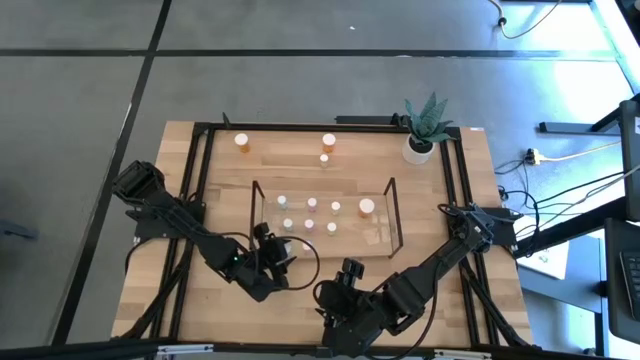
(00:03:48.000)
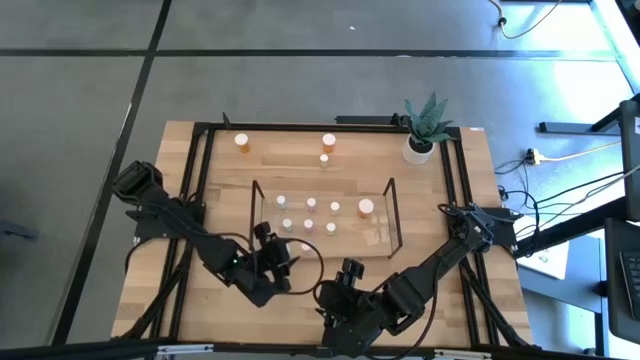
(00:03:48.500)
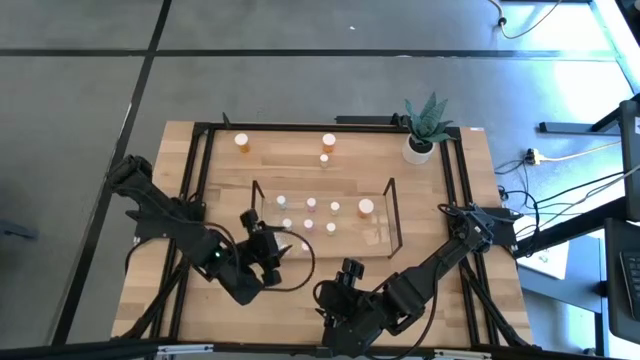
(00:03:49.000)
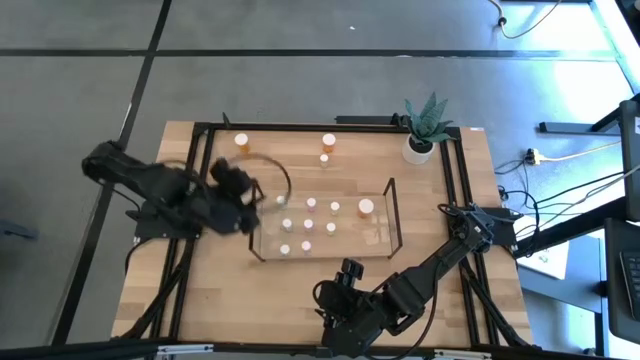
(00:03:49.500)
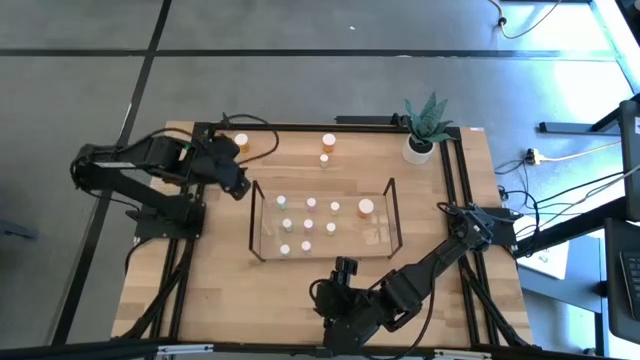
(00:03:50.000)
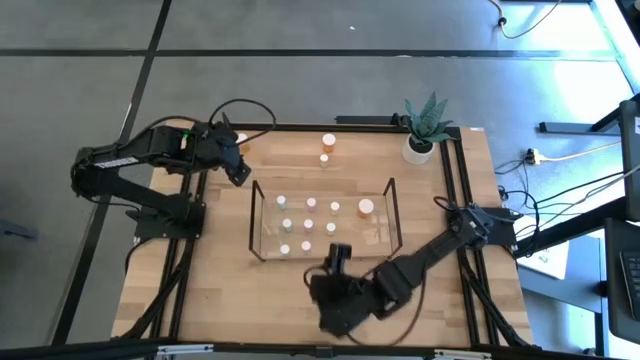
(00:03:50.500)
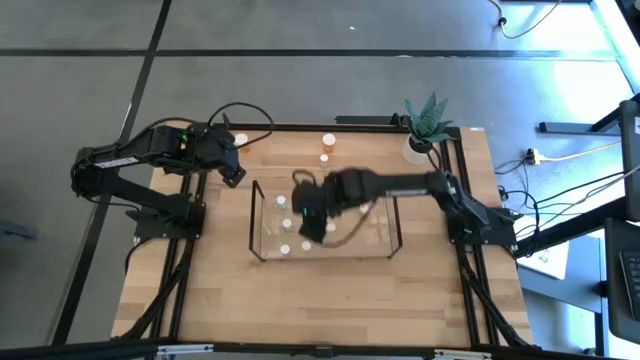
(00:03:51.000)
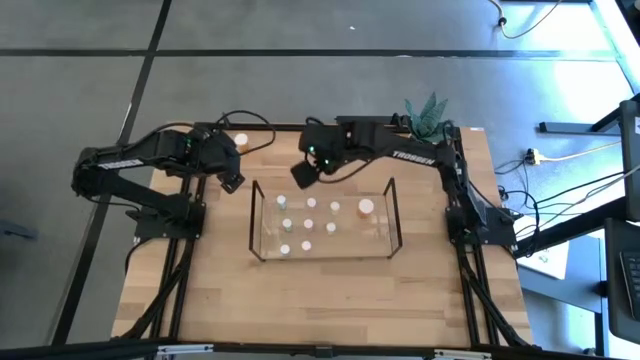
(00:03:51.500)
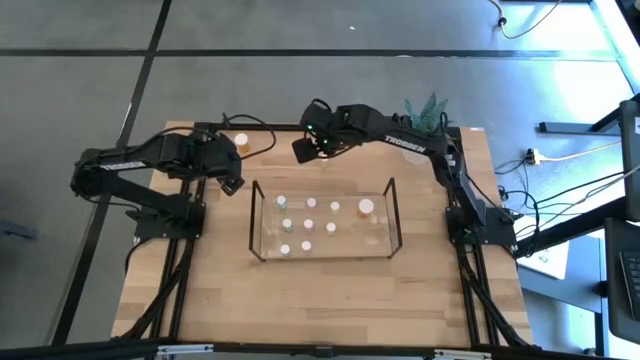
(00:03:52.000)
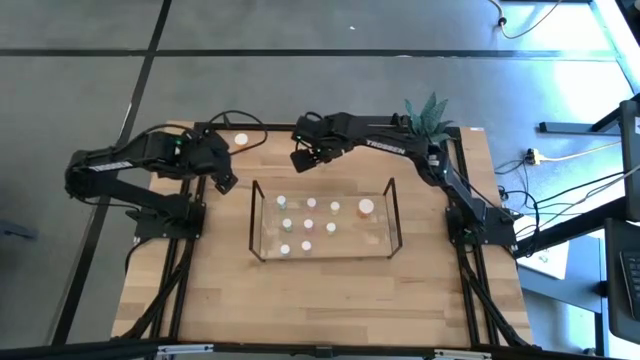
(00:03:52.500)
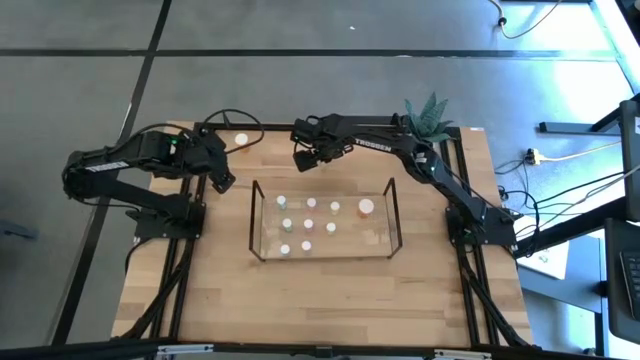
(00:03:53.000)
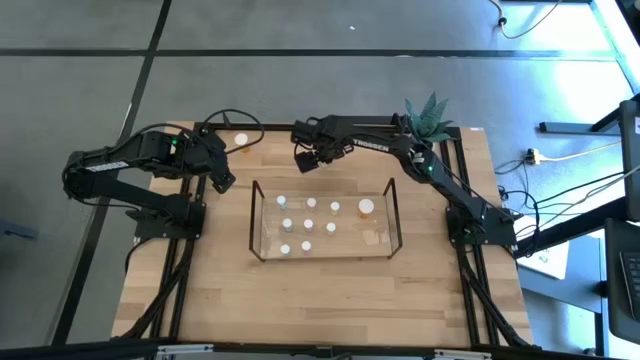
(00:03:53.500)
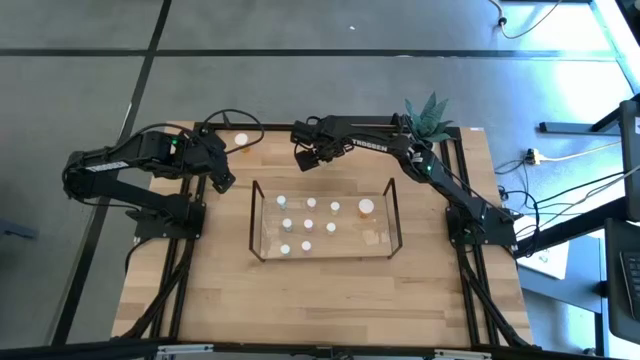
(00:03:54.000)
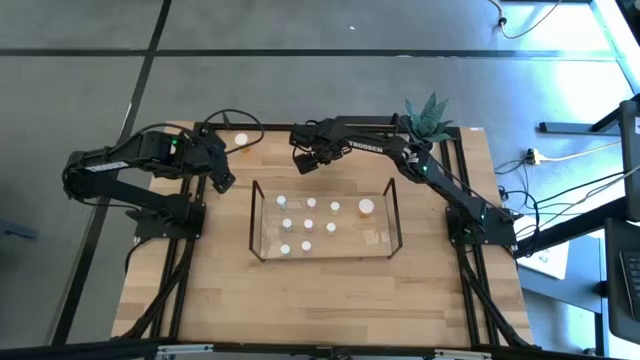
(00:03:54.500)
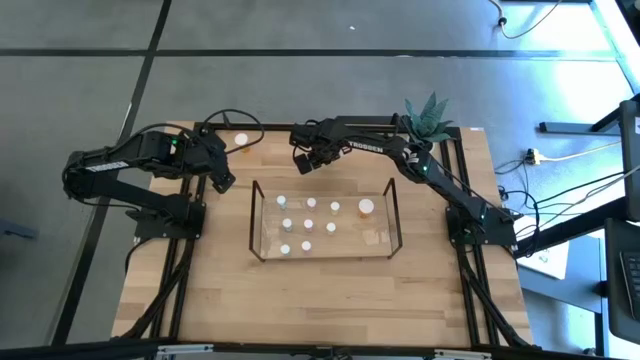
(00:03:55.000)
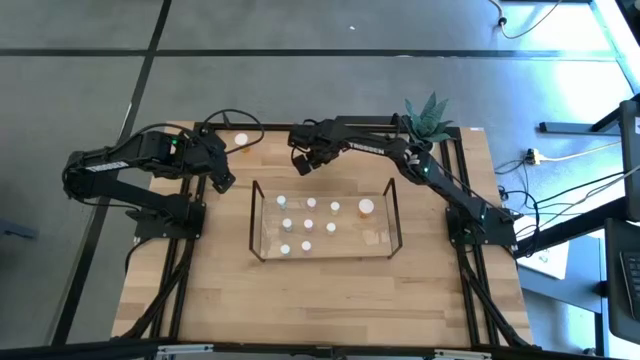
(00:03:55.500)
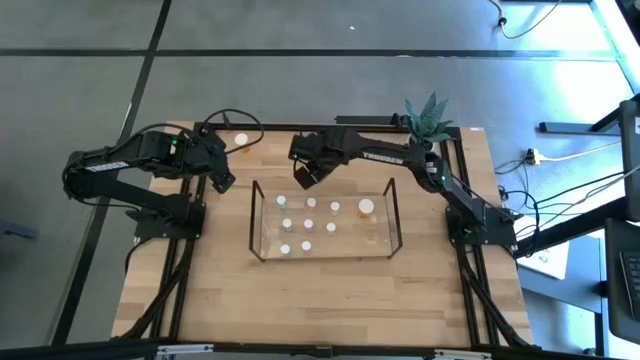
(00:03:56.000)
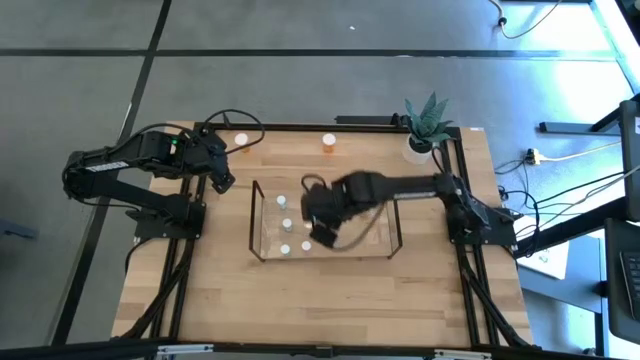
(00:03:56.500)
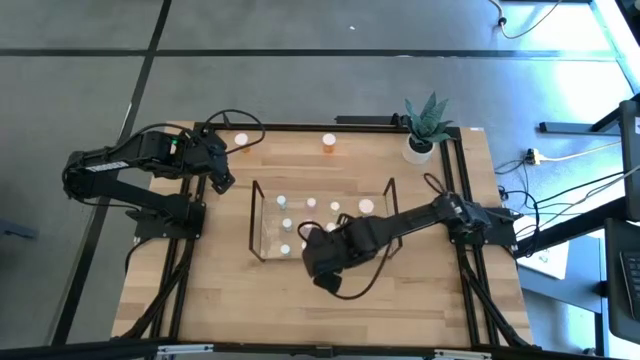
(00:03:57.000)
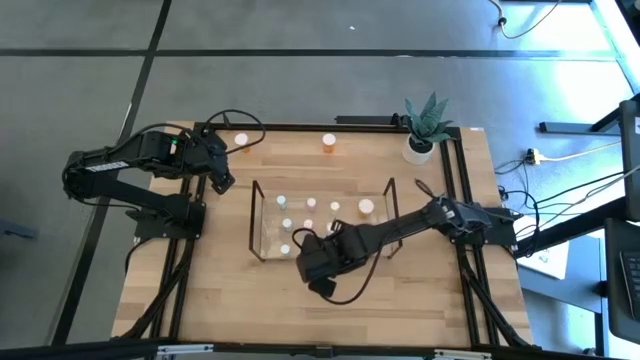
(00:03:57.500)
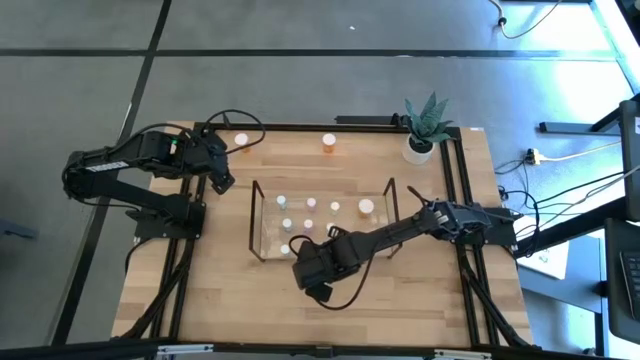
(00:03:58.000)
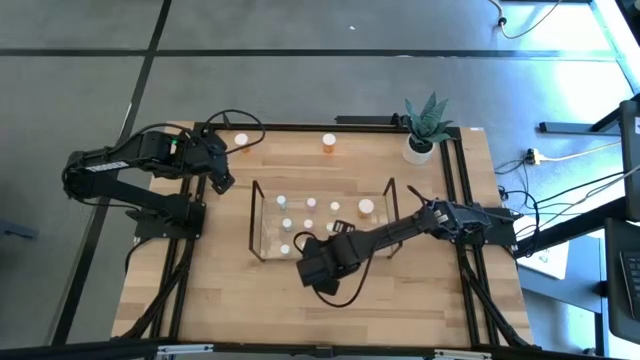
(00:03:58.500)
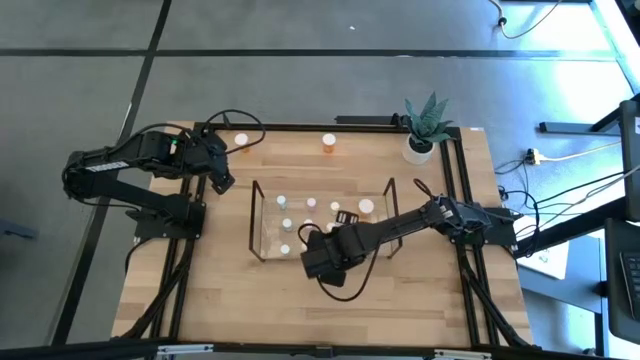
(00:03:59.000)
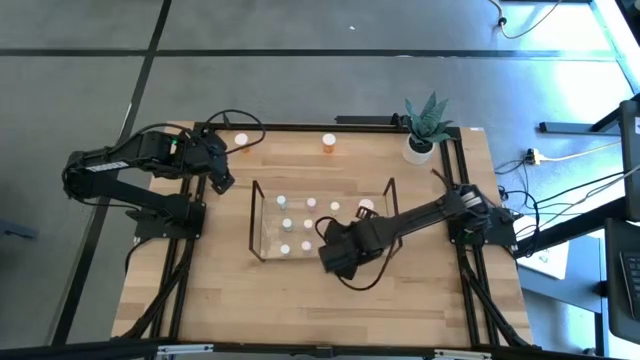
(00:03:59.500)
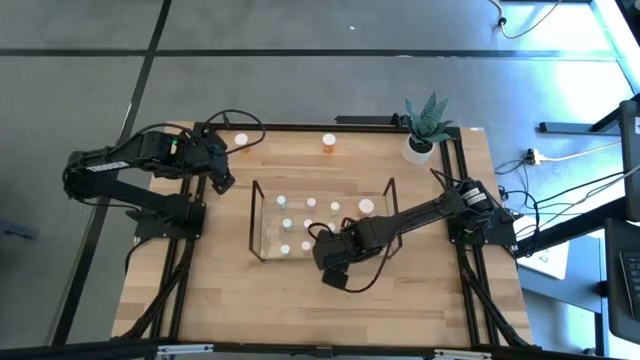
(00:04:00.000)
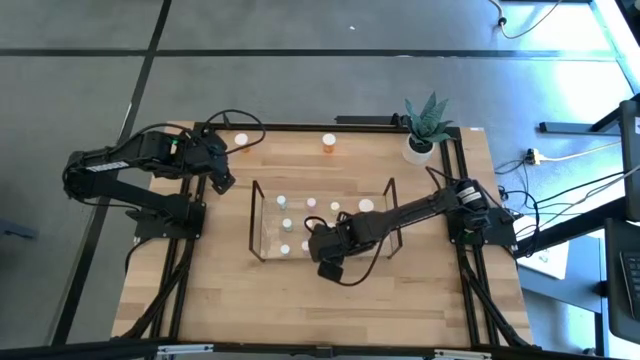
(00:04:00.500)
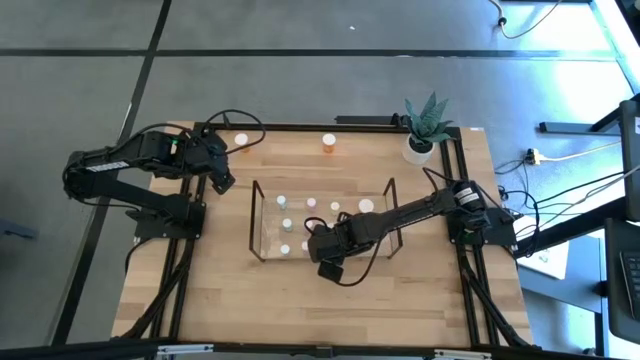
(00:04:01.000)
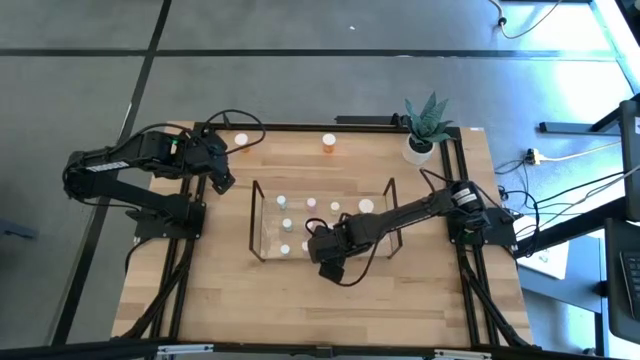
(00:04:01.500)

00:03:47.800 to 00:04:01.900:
Task: Pick and place medicine bottles onto shelf by color
Put the yellow pill bottle on the shelf aligned with the other yellow pill bottles

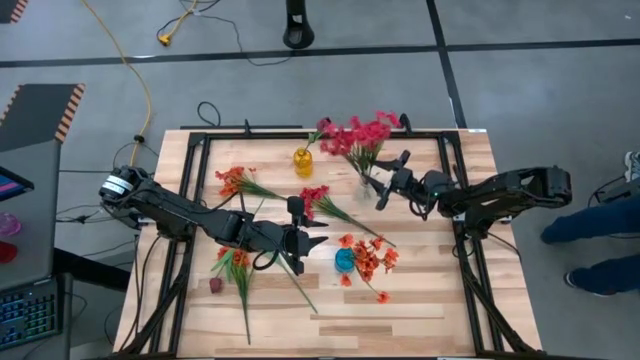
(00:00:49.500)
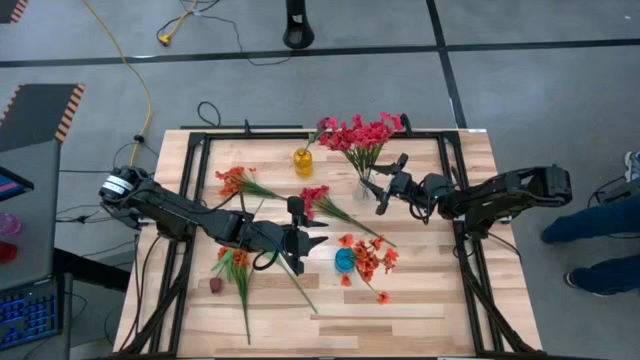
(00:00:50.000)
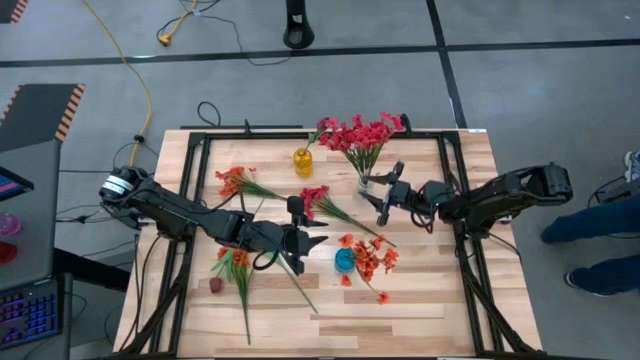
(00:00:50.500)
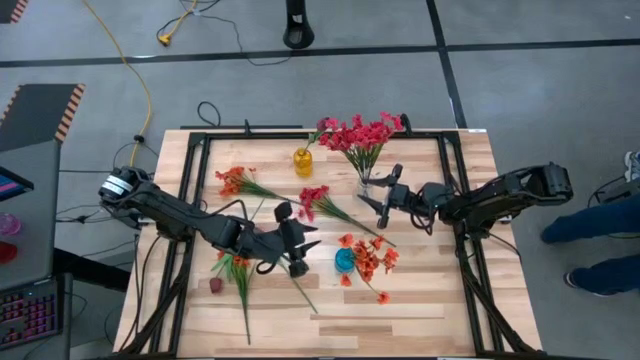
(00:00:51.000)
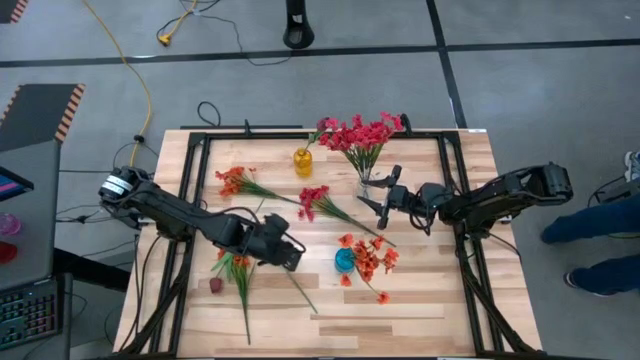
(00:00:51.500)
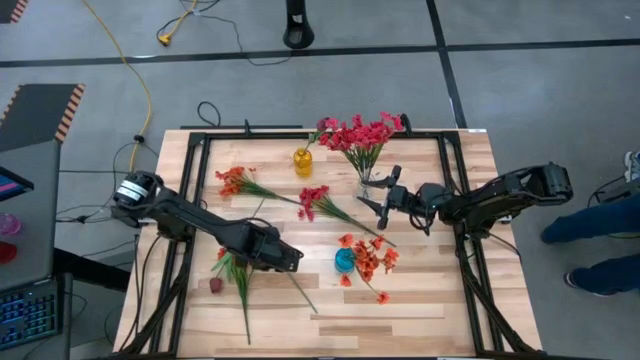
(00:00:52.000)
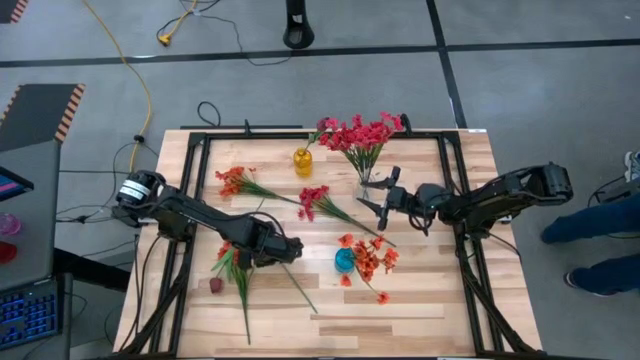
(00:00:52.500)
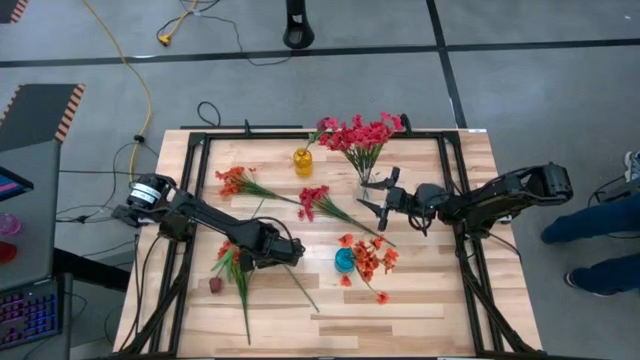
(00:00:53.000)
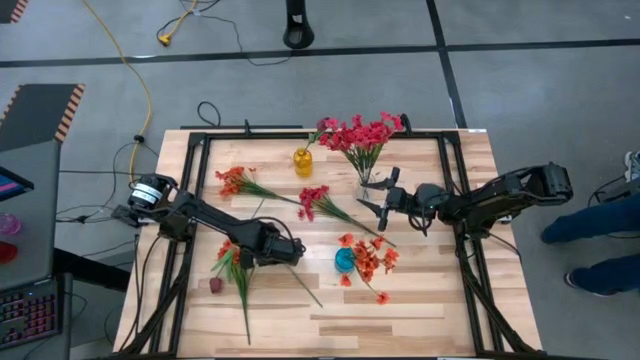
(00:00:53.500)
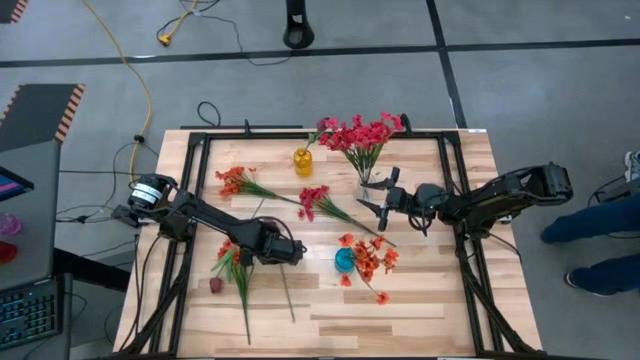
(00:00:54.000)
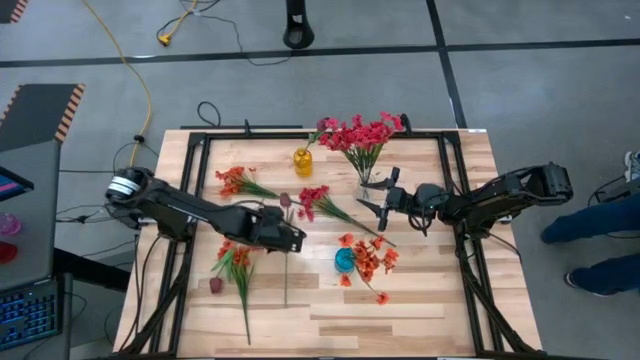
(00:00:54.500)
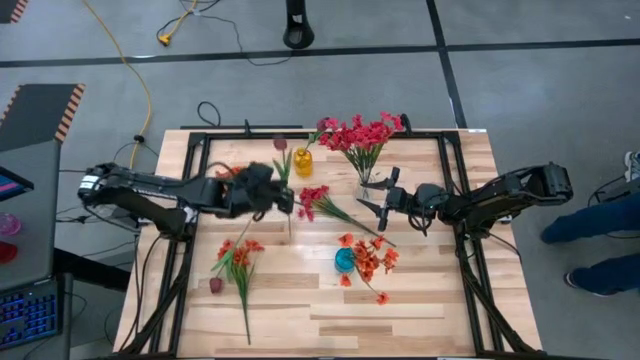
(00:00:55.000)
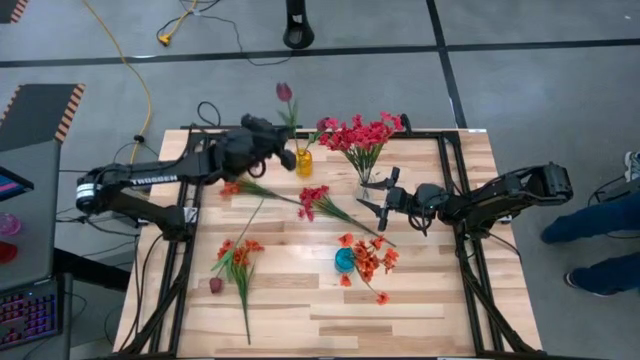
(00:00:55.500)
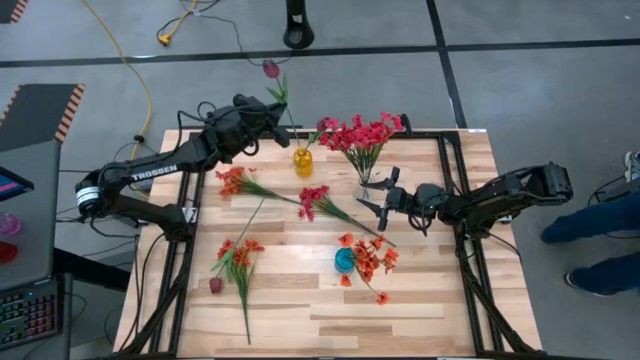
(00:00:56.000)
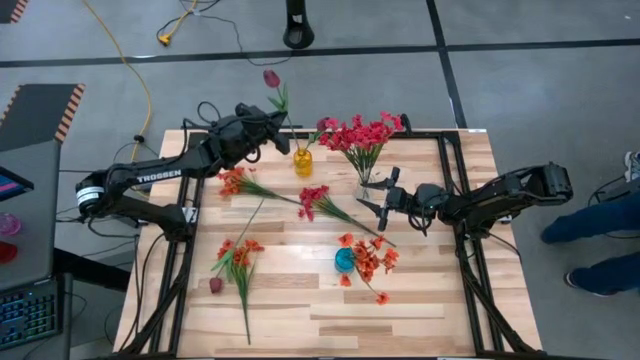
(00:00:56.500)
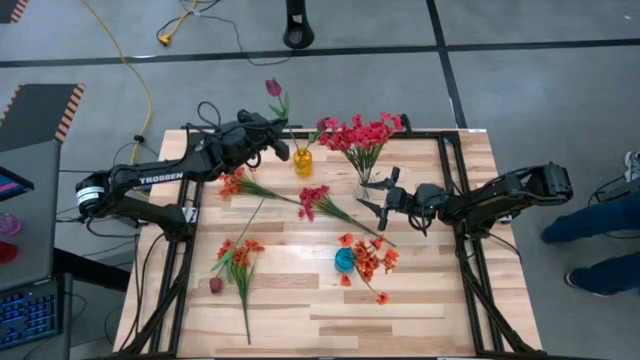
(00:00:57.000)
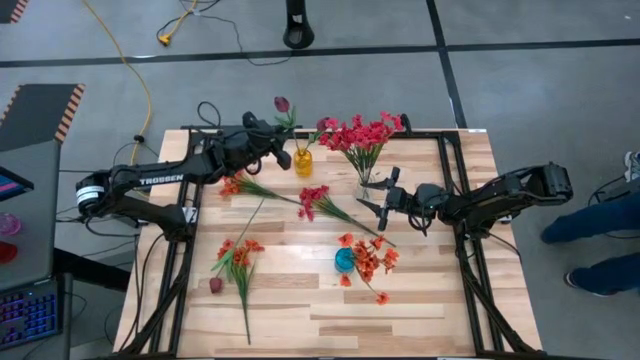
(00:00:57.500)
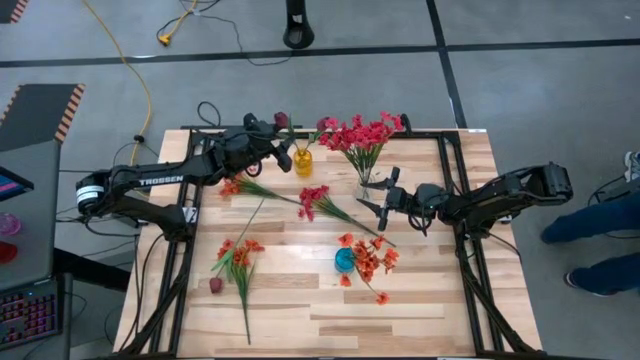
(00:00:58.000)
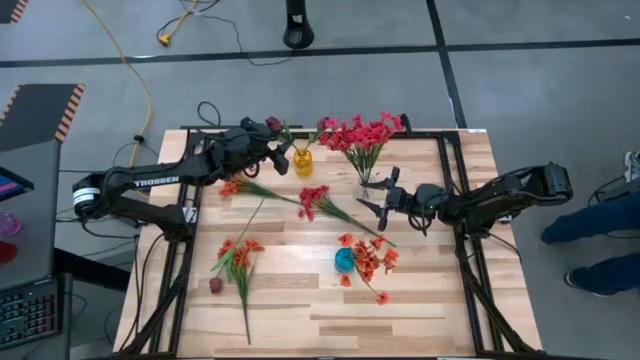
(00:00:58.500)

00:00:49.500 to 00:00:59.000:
Task: Sort flowers into vase by color
Put the right dark red flower into the yellow vase
